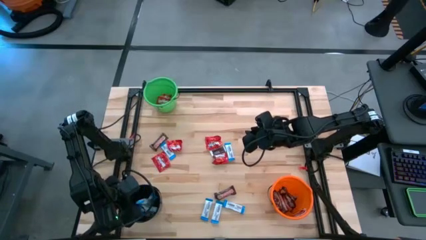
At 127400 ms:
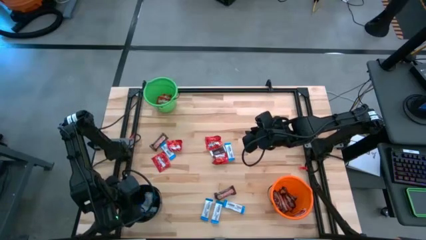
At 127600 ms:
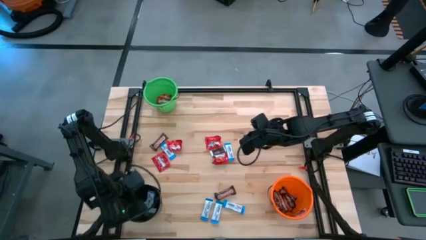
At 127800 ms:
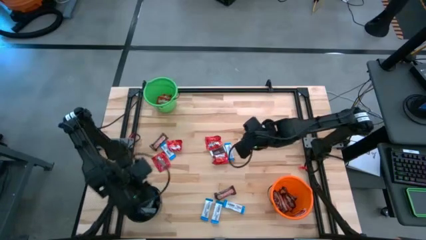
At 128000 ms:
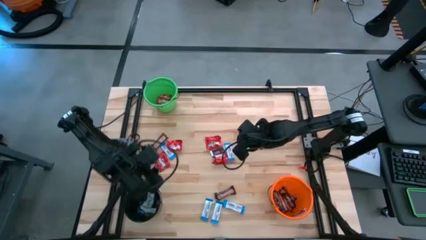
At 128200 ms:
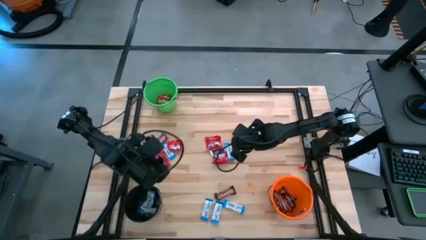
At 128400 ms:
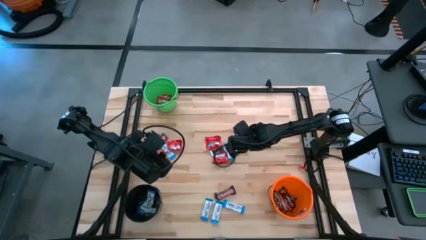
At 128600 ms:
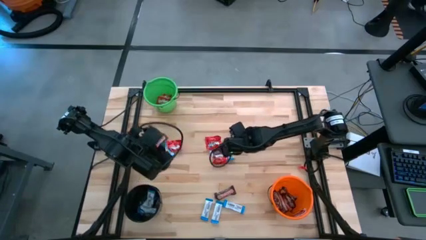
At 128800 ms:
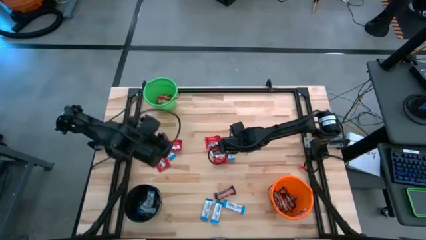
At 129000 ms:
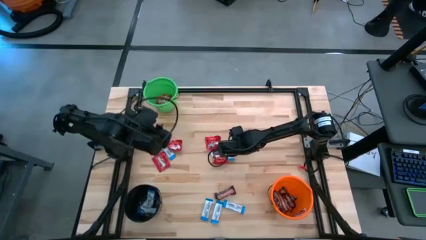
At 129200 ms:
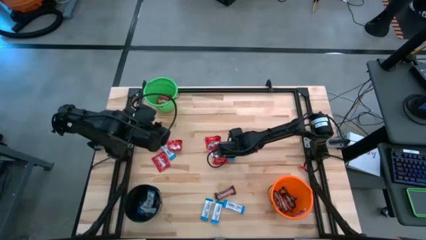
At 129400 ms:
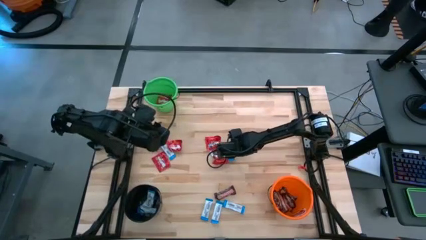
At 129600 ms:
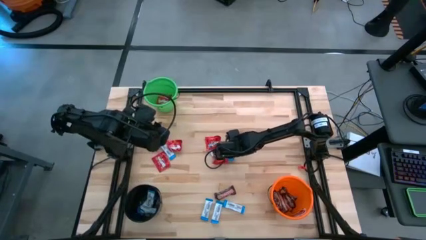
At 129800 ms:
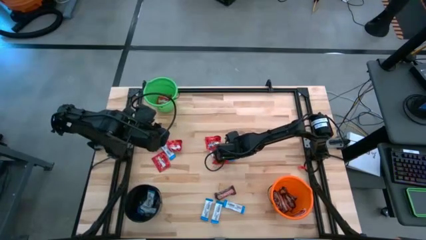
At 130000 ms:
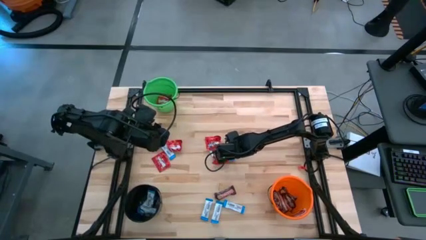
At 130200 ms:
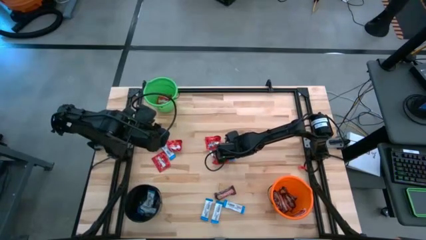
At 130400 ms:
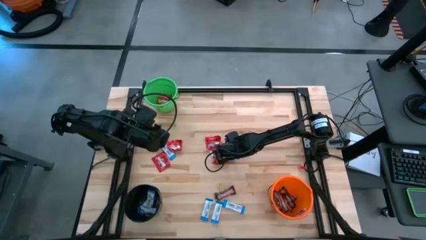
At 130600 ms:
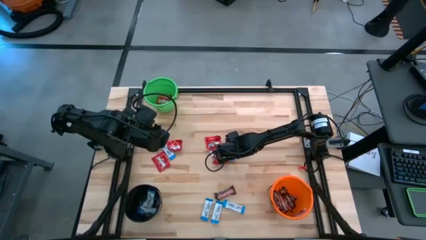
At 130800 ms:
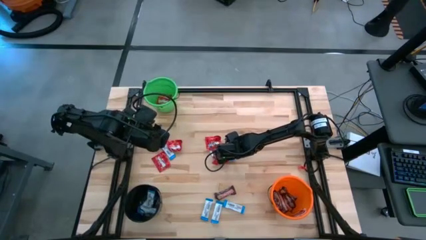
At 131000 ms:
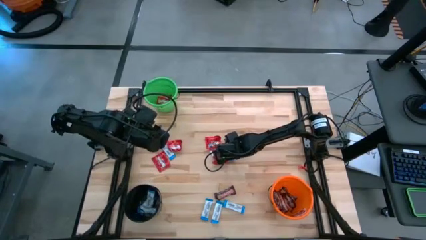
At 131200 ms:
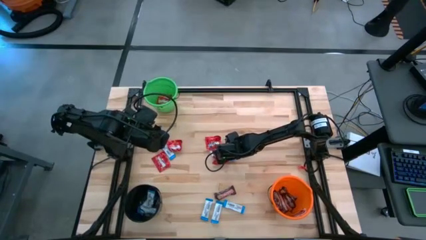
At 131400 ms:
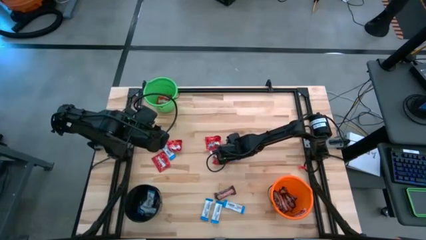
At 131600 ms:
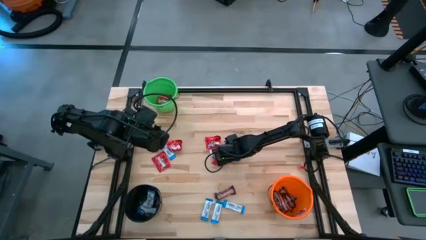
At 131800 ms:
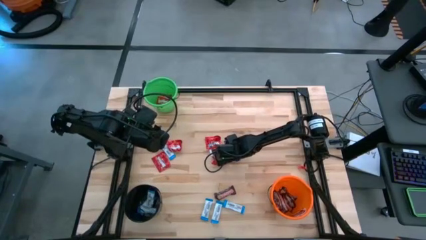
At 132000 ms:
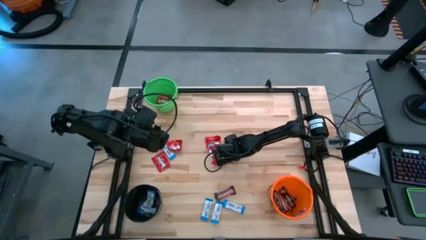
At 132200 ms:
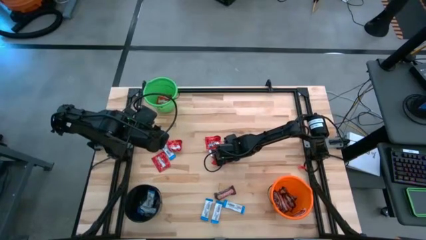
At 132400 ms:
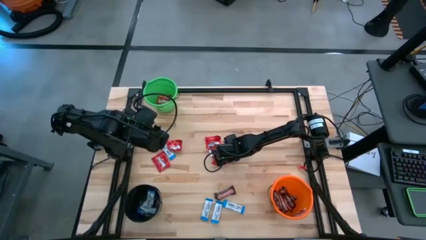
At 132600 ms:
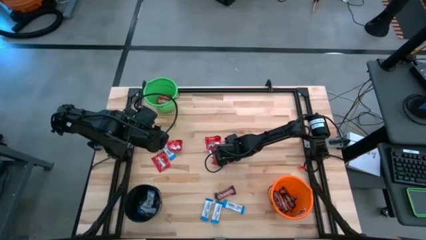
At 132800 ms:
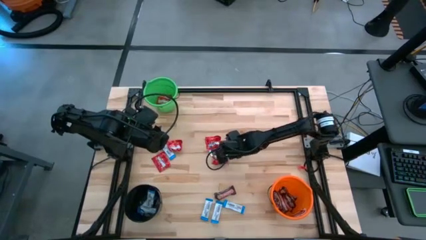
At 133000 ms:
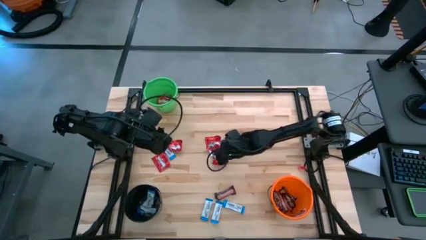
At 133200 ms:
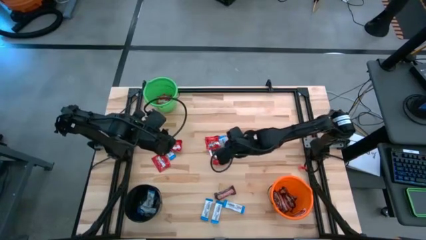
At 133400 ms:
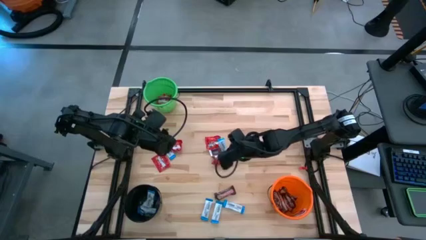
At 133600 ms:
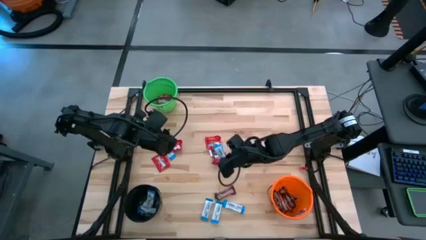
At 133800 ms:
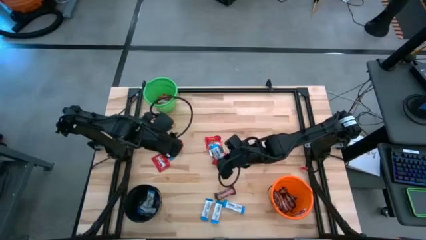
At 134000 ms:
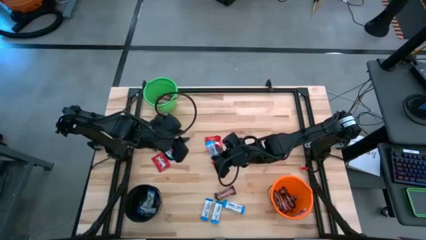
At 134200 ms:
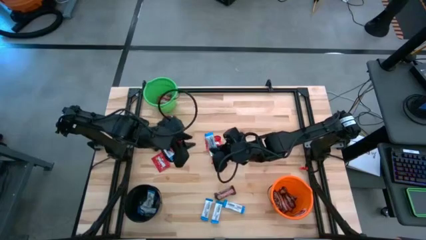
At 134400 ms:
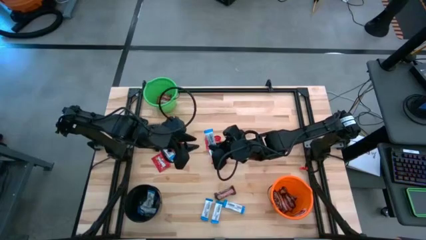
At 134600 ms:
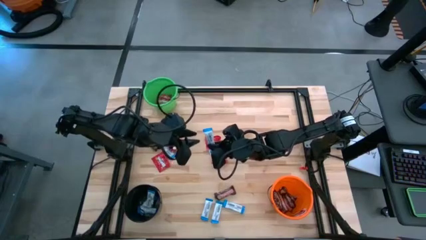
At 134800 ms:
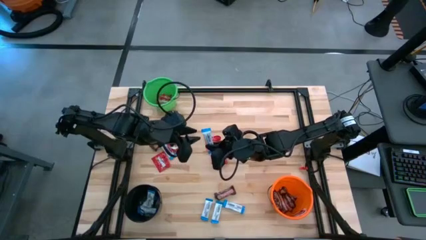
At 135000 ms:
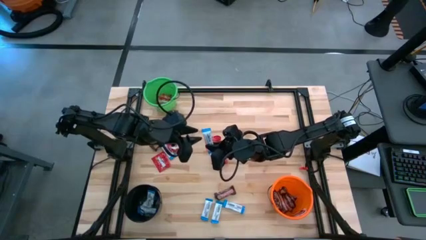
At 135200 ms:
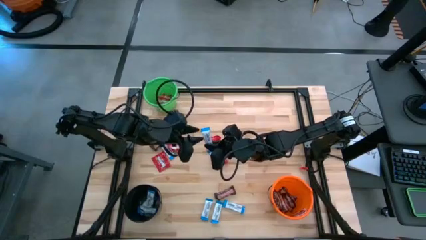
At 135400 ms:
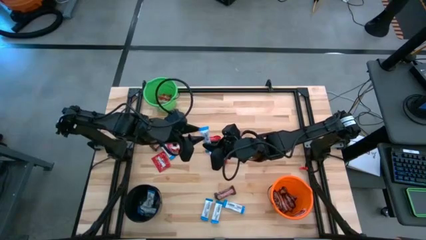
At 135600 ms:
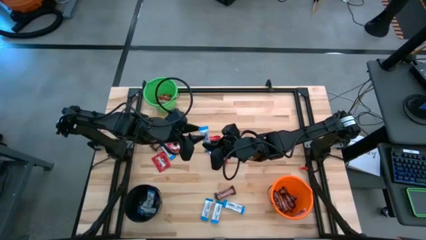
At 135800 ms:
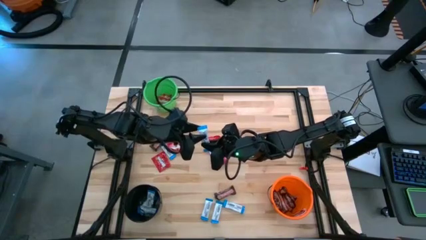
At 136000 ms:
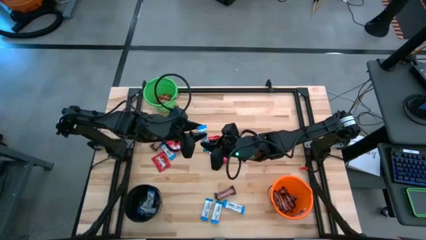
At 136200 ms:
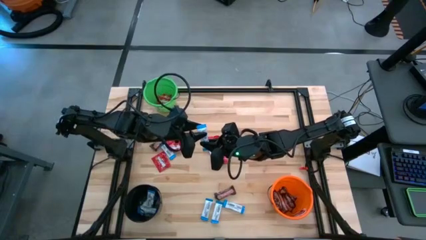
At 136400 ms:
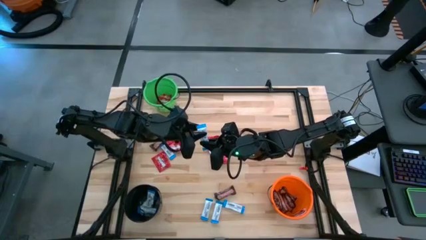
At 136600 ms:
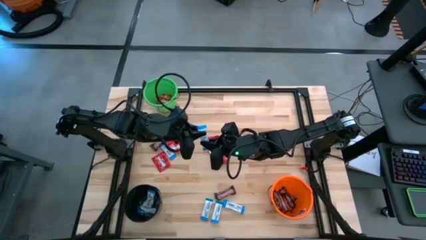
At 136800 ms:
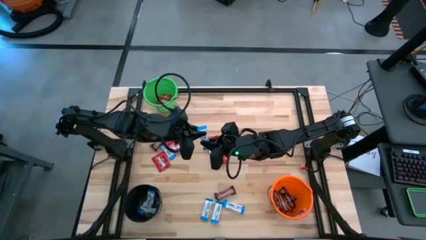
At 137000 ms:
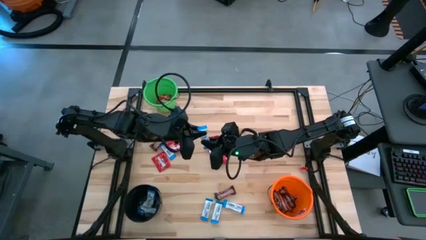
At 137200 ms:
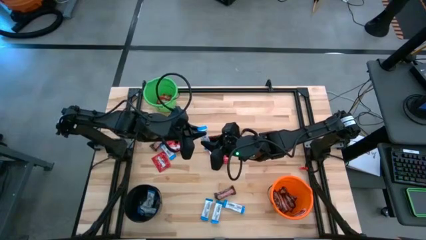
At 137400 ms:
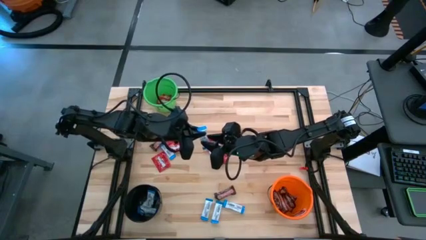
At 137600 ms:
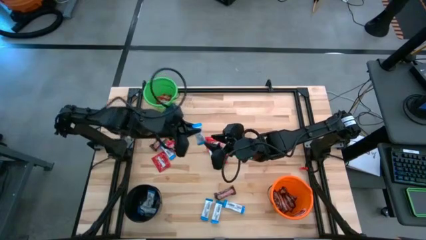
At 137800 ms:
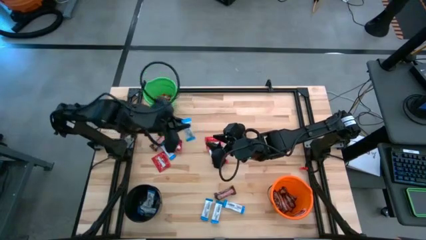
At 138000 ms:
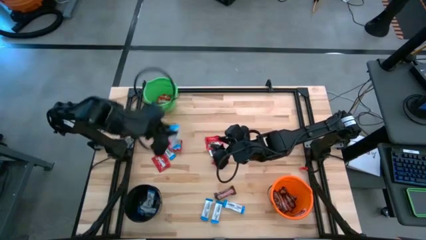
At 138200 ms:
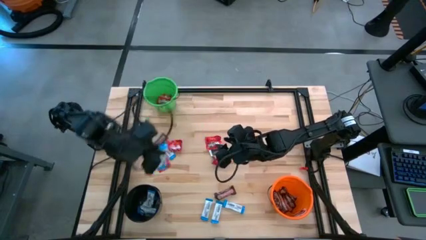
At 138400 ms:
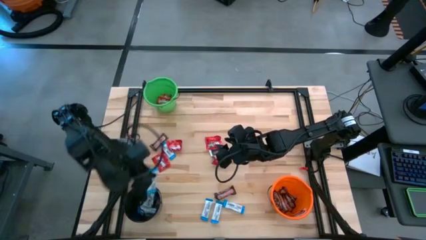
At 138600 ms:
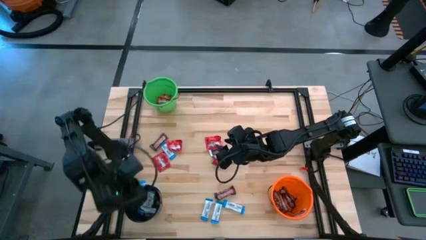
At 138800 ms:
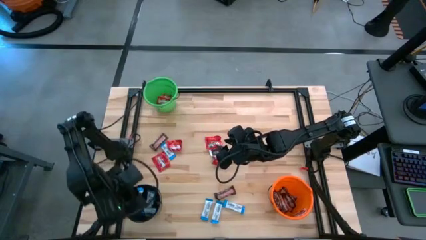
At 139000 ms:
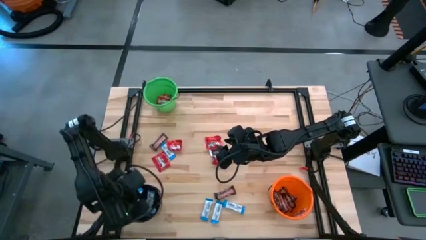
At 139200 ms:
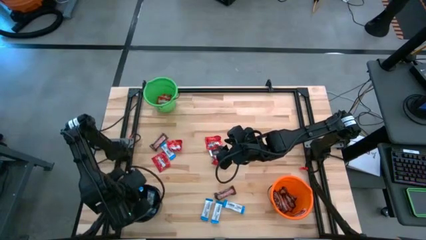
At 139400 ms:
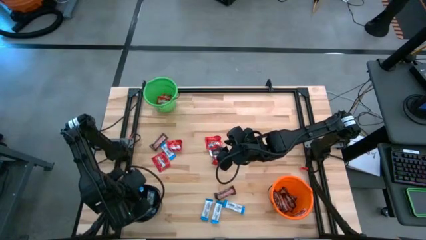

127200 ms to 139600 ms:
Task: Sort candy
Put the white chocolate into the black bucket

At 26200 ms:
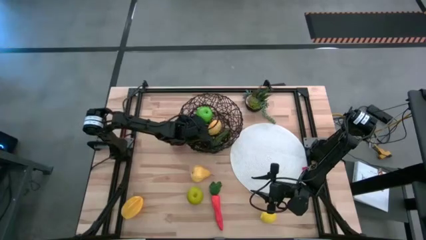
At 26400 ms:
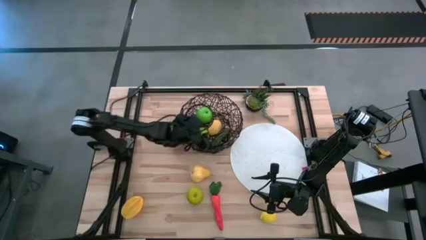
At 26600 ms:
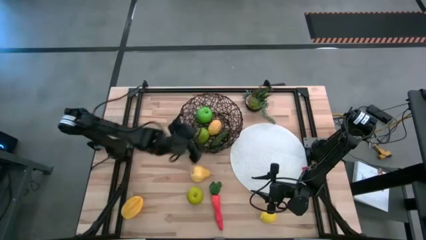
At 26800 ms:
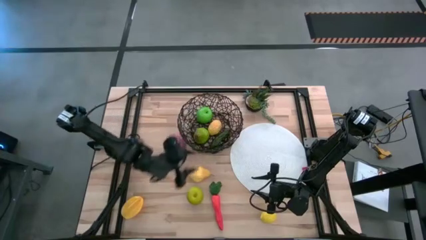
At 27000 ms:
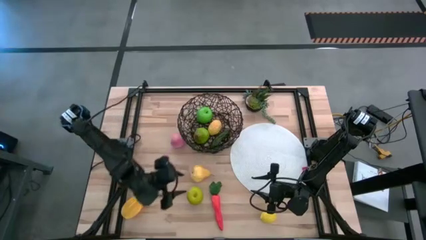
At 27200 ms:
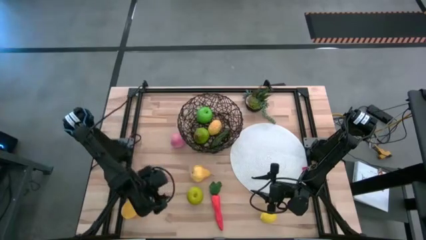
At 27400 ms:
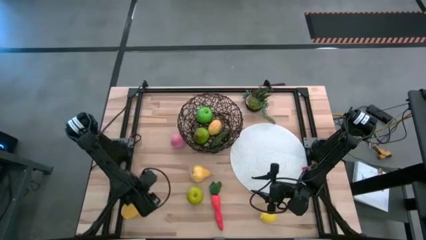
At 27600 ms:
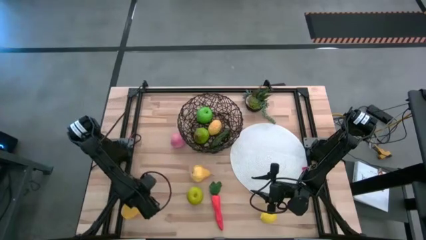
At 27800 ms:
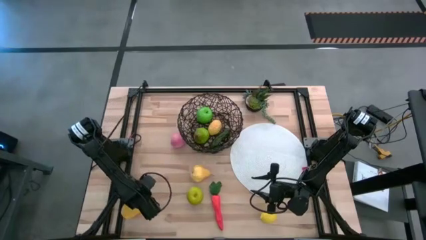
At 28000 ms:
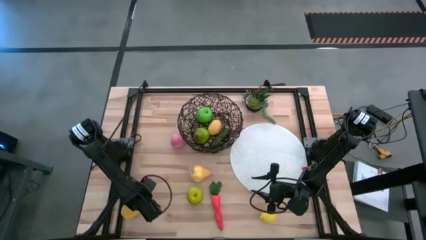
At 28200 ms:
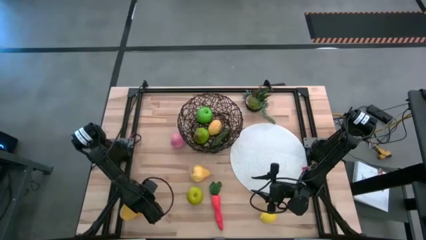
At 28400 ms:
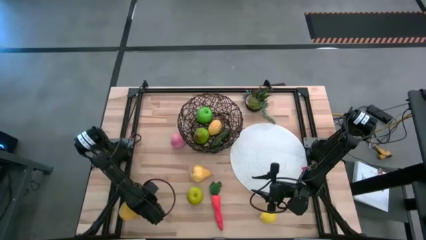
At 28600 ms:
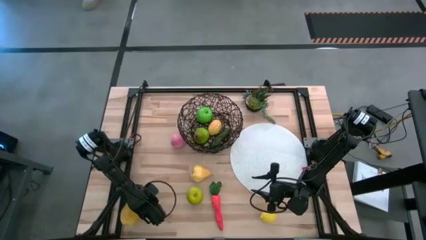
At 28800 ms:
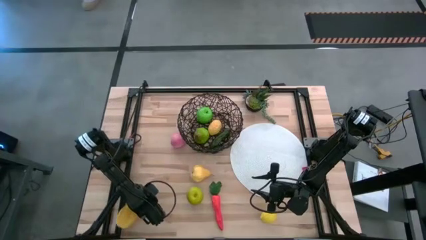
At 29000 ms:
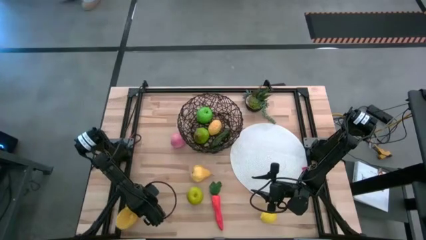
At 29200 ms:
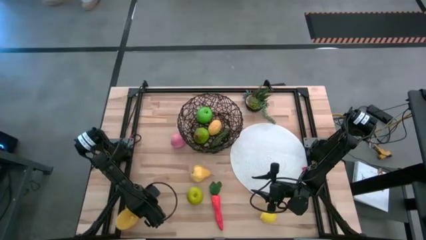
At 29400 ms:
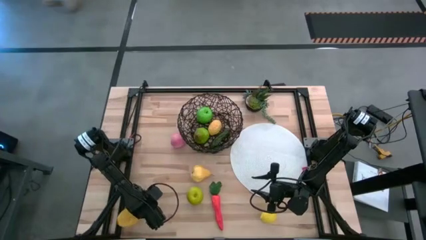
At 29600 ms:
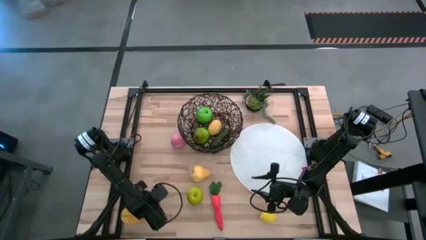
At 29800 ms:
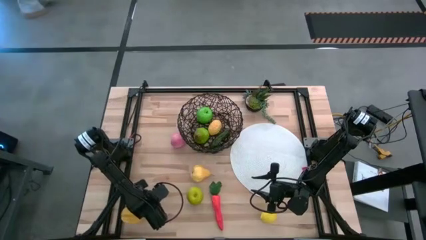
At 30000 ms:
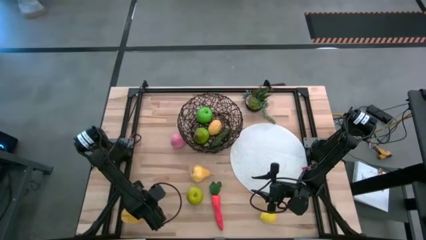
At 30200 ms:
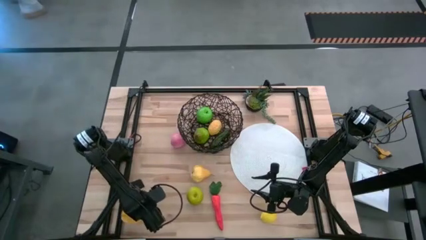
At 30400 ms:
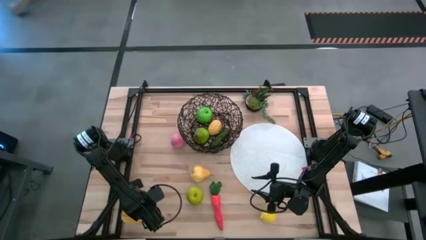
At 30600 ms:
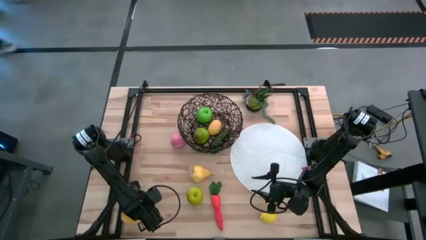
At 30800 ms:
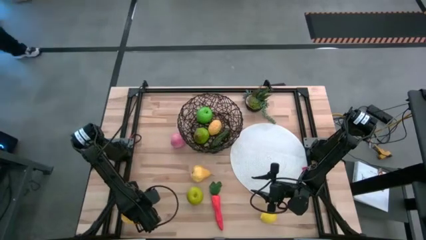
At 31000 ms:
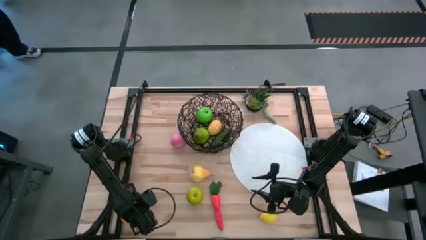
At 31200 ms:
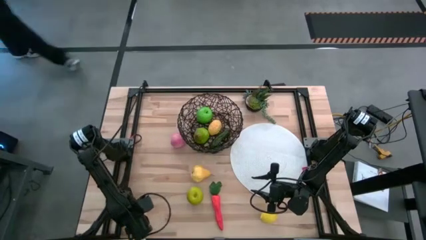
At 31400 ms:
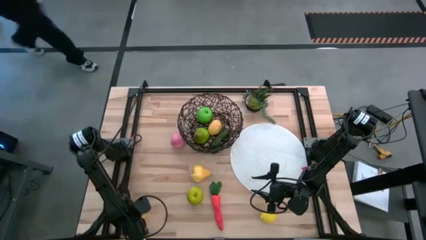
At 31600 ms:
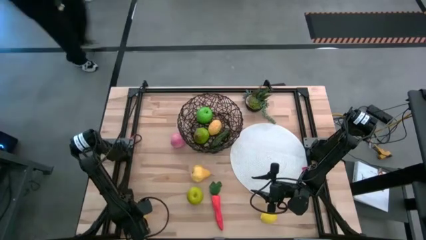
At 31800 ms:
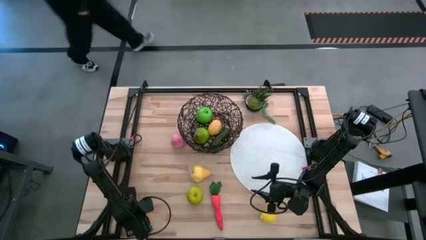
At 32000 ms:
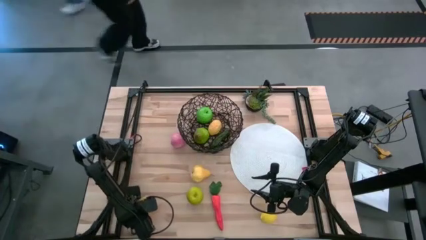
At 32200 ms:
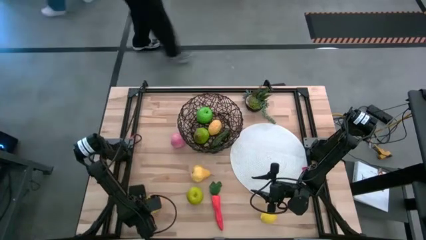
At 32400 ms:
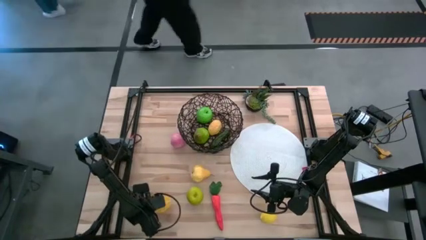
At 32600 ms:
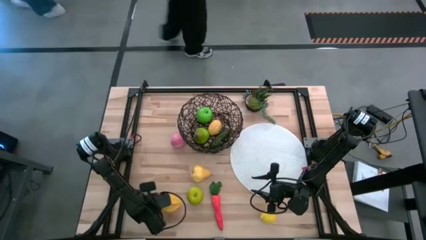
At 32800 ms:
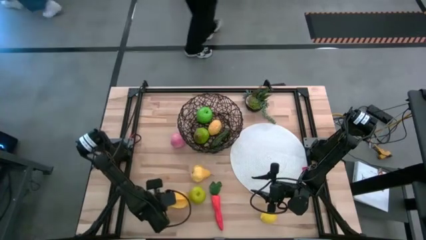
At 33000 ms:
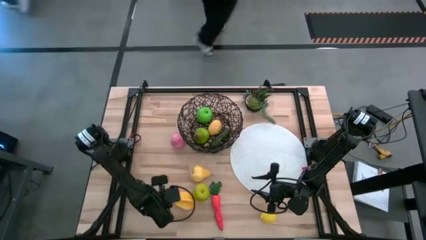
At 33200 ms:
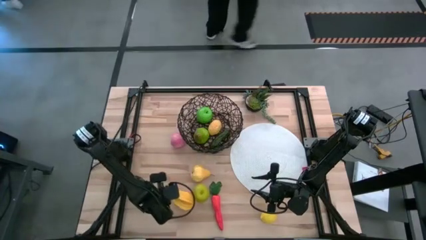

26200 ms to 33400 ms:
Task: Build produce basket
Put the starfruit into the wire basket
